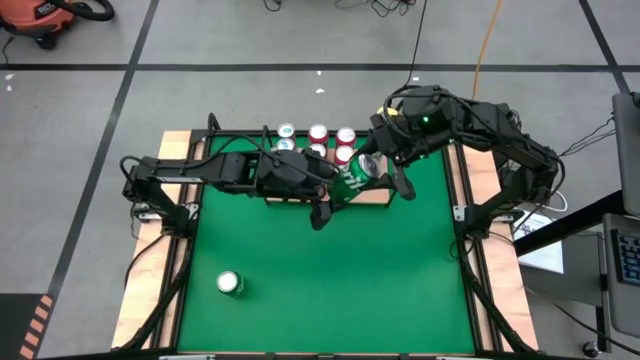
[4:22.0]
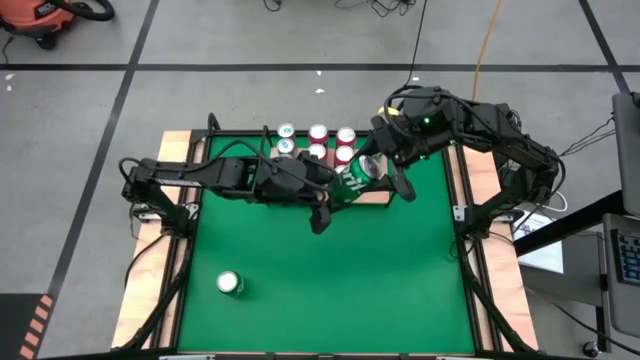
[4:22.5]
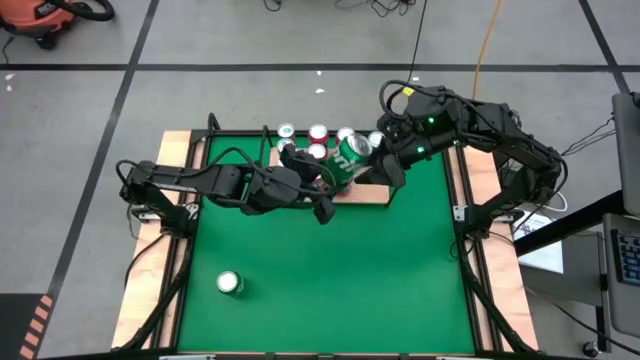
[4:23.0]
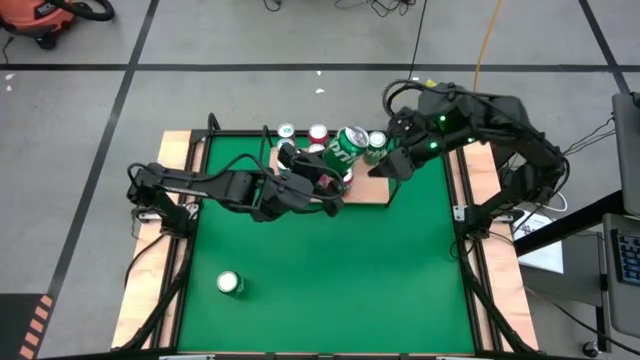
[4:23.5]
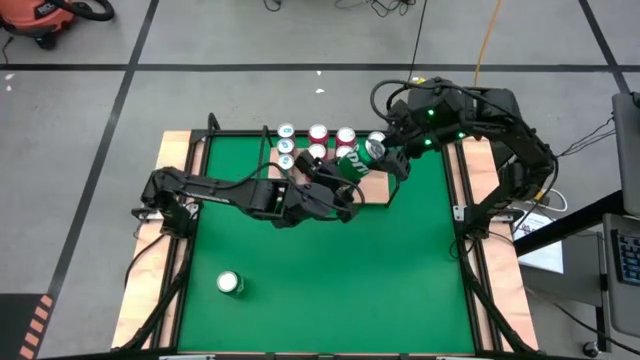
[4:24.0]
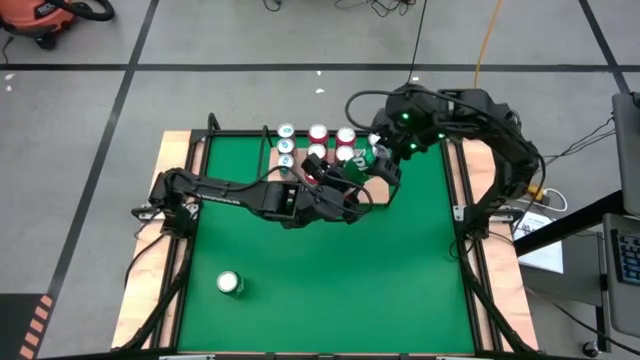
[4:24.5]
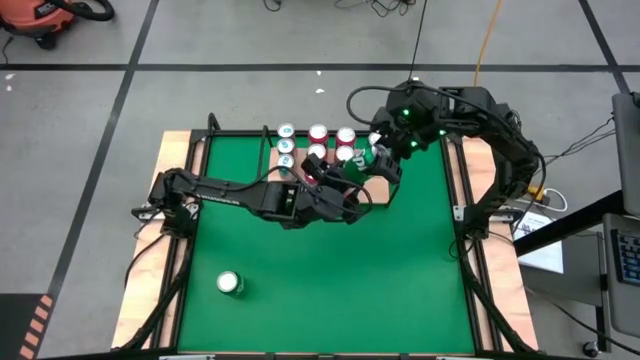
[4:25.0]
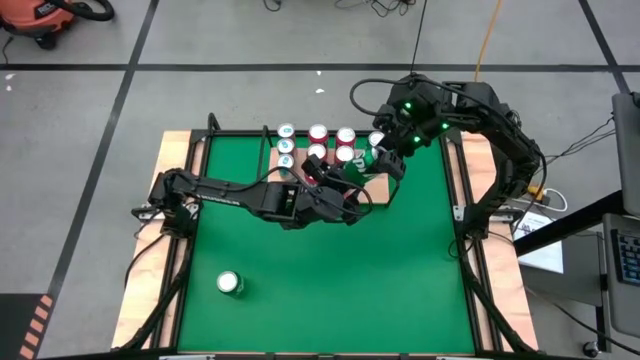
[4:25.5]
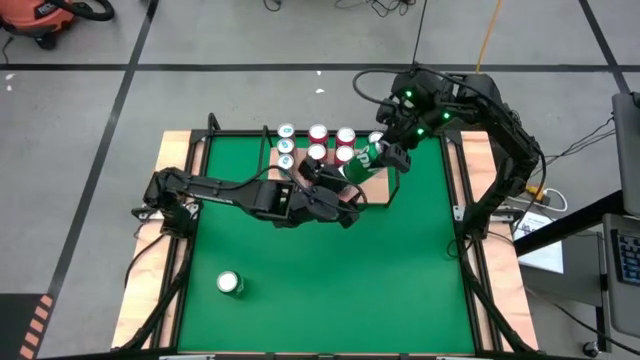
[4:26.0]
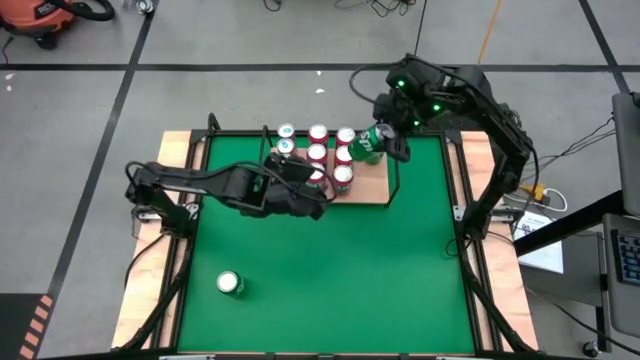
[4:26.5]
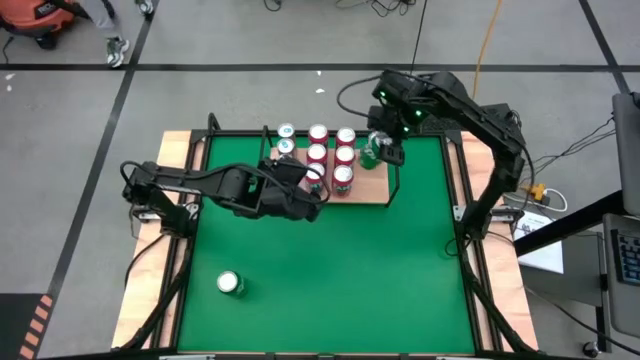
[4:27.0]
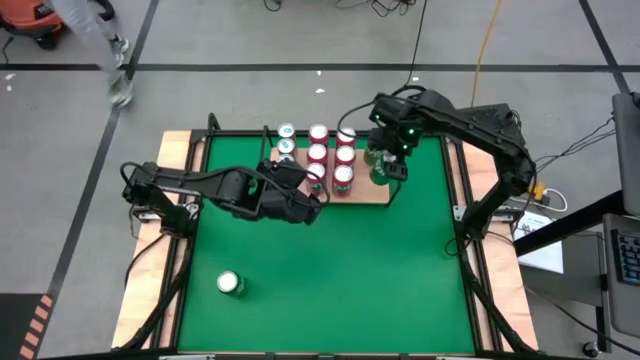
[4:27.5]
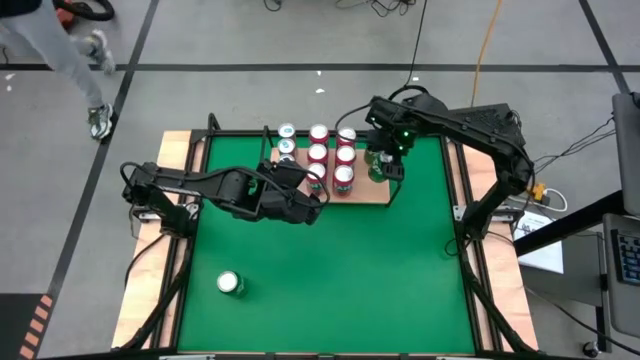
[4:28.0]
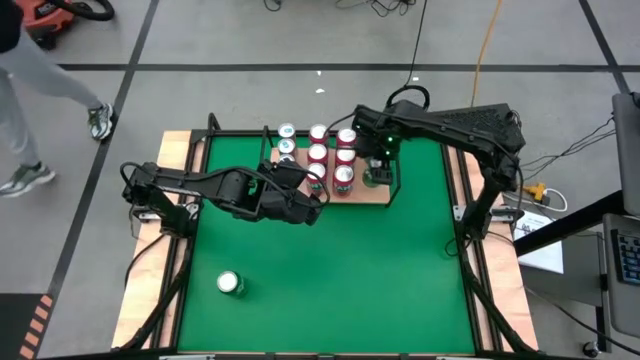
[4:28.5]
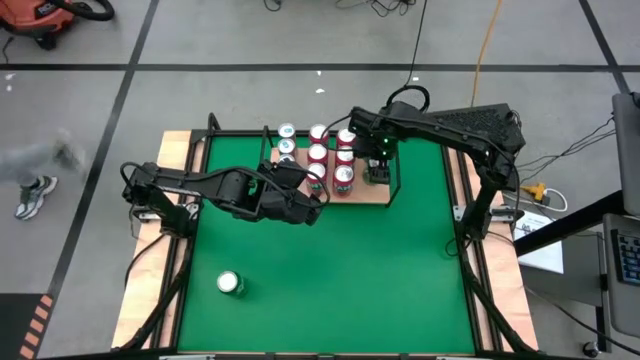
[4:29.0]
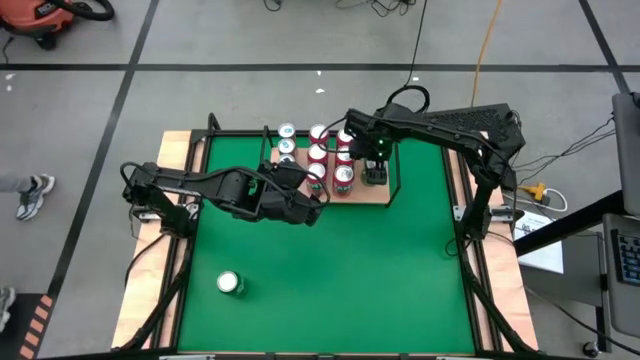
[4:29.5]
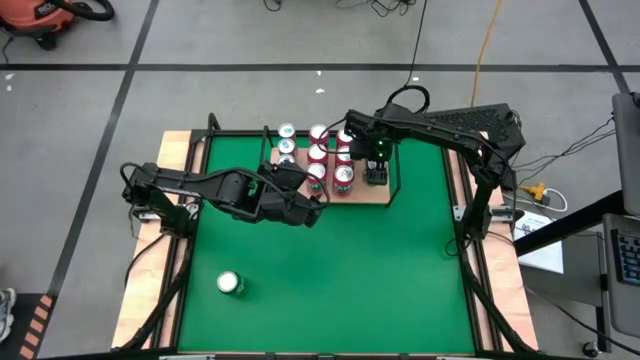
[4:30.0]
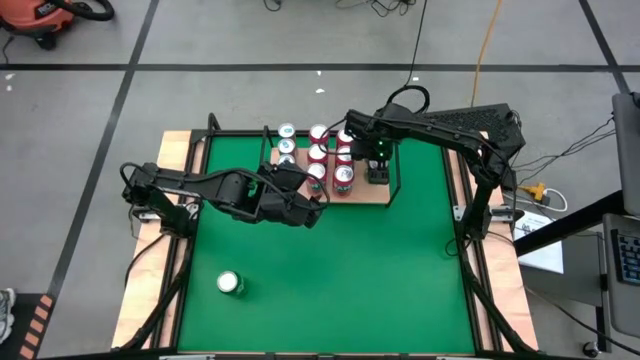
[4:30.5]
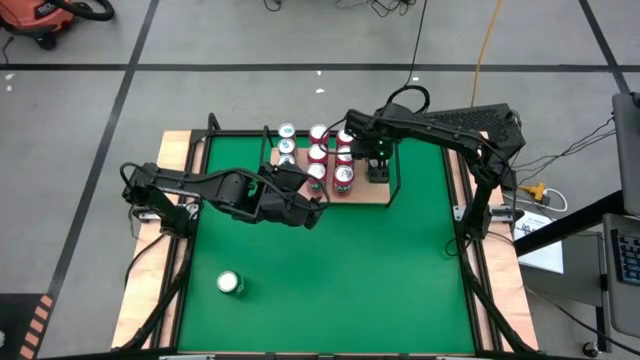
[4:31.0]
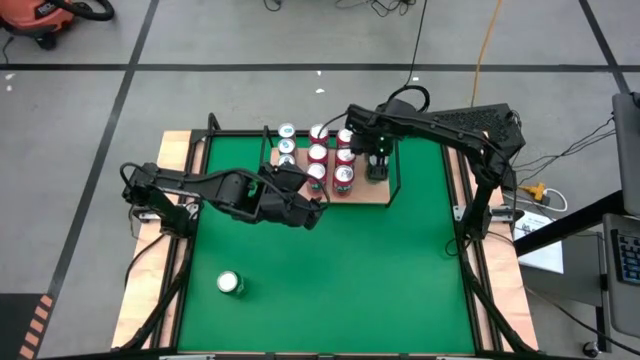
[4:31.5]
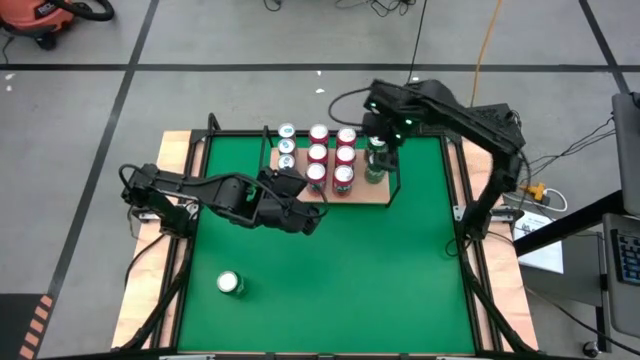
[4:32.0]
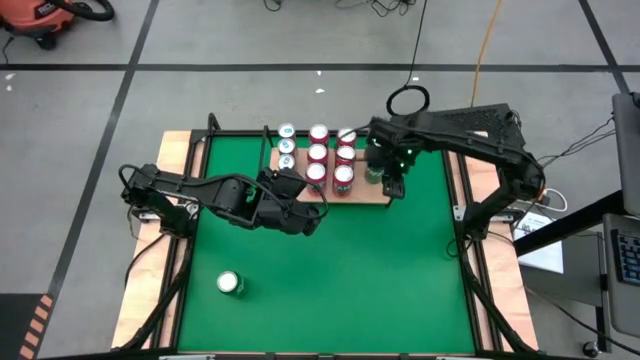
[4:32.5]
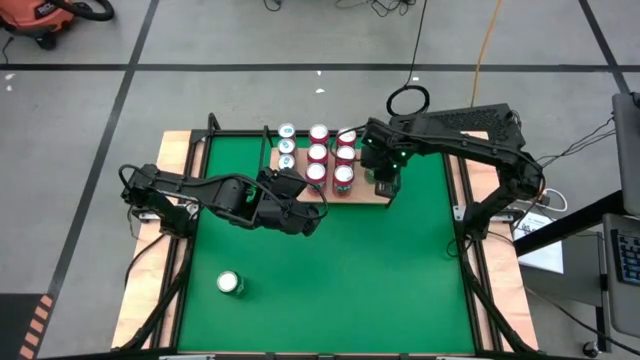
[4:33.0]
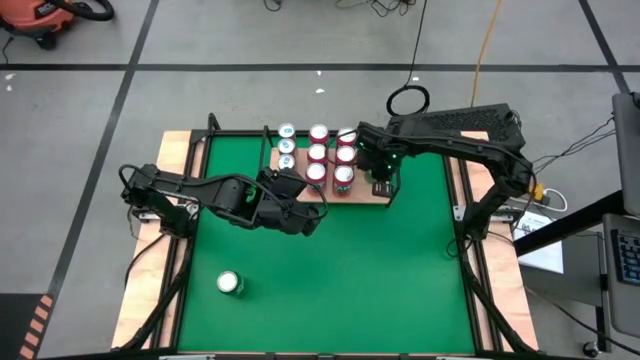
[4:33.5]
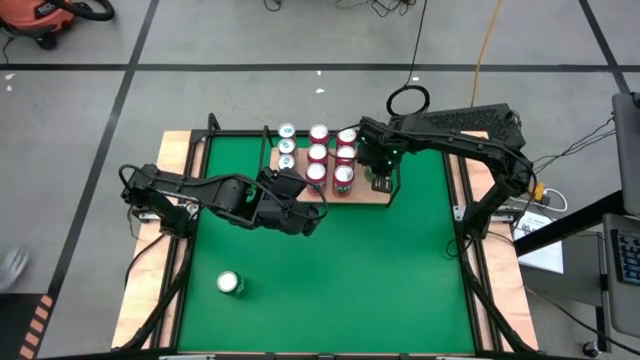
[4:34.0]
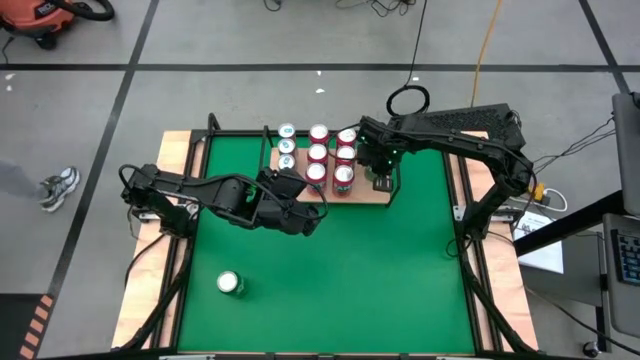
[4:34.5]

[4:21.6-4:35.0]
Task: Place canned beverage on shelf
Put the green soda can on the shelf aligned with the other green soda can

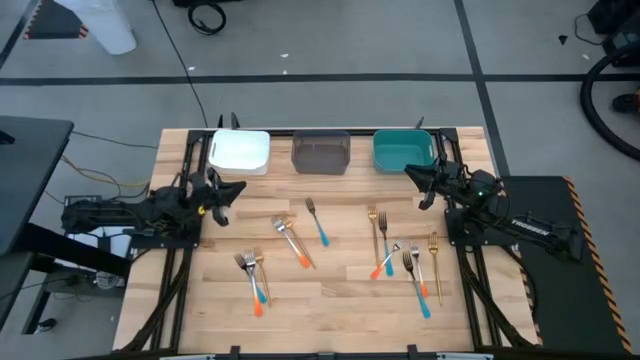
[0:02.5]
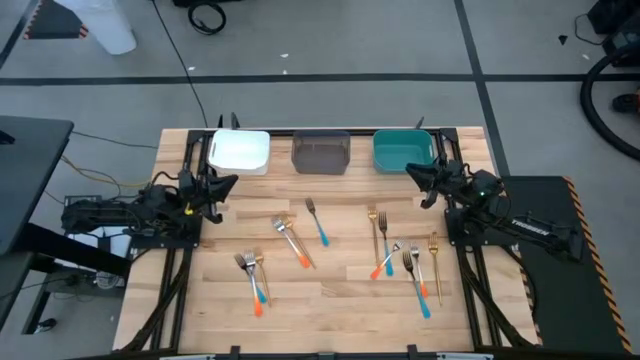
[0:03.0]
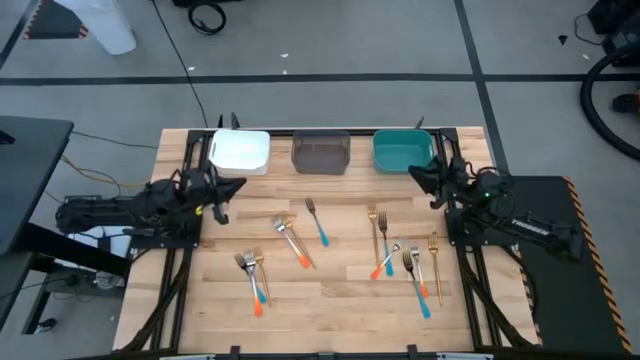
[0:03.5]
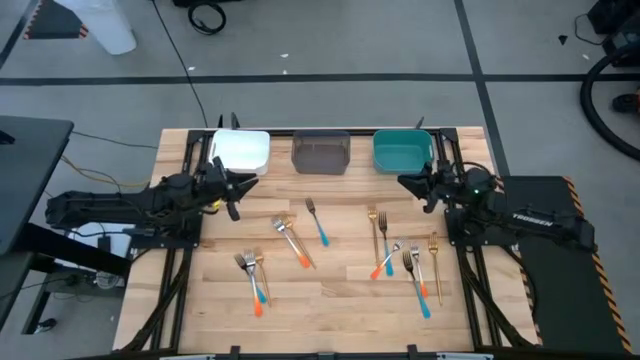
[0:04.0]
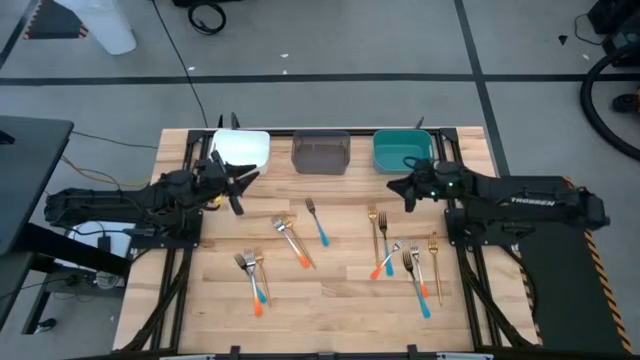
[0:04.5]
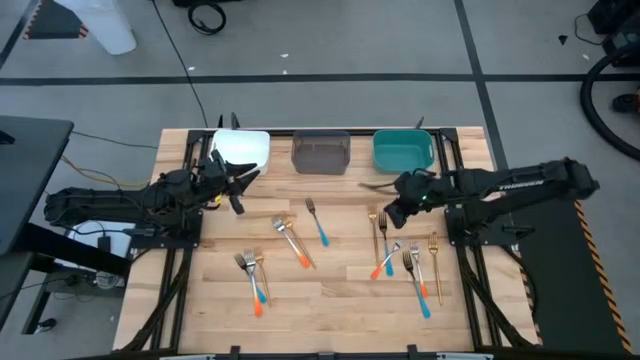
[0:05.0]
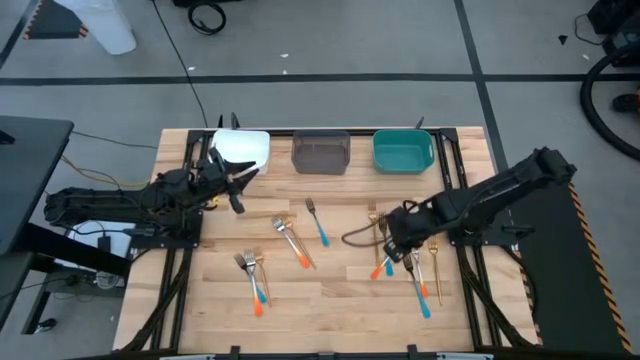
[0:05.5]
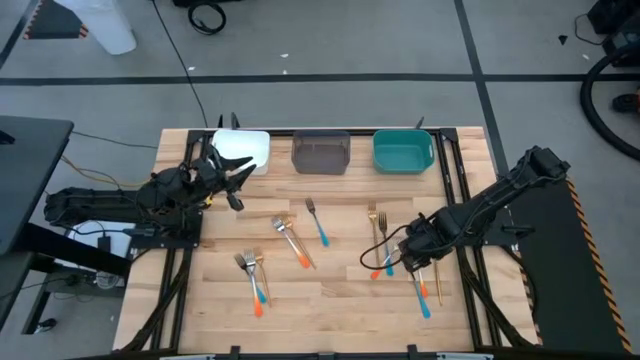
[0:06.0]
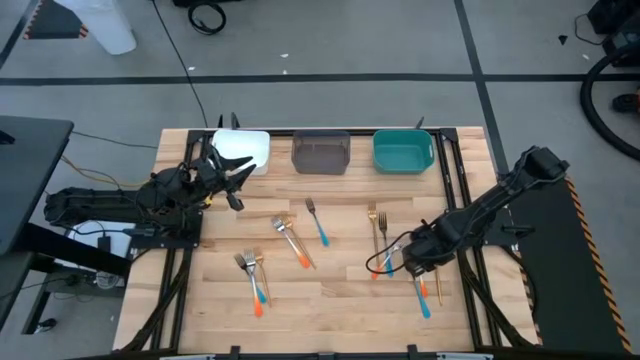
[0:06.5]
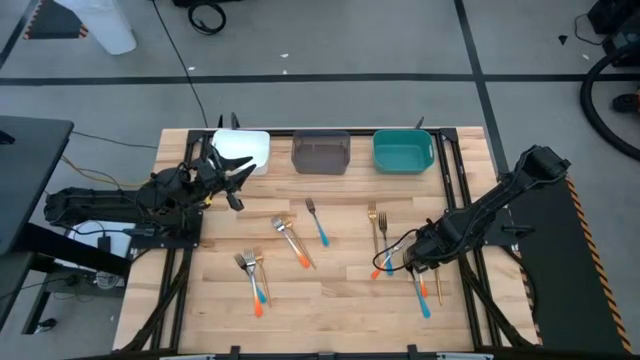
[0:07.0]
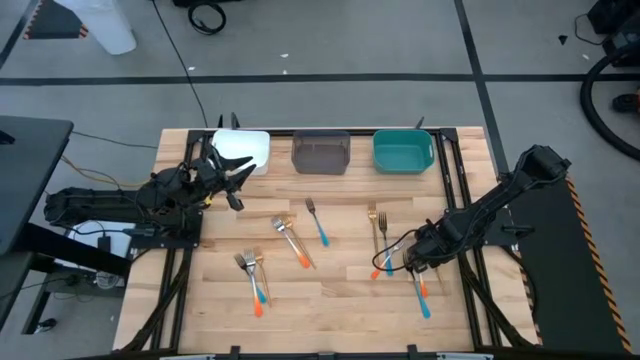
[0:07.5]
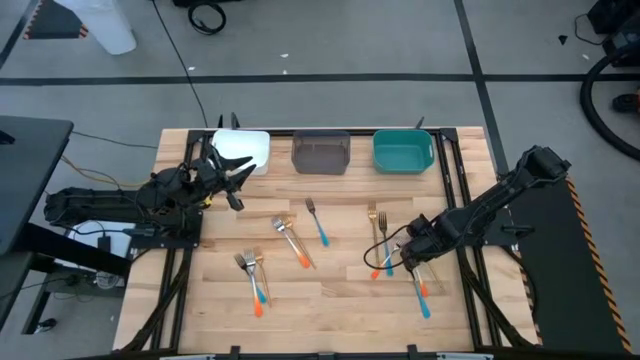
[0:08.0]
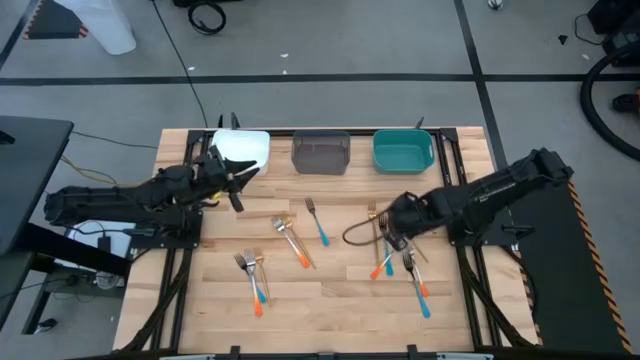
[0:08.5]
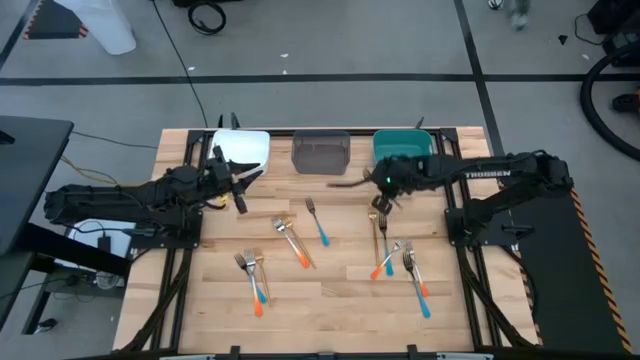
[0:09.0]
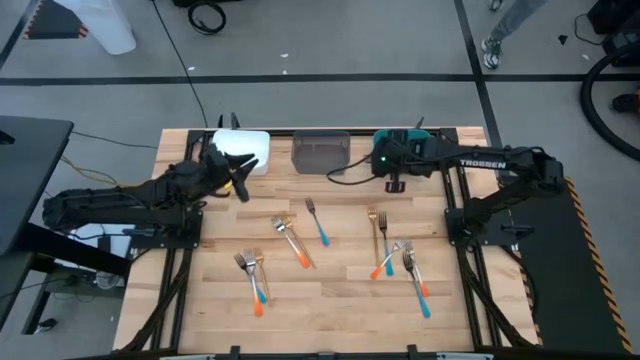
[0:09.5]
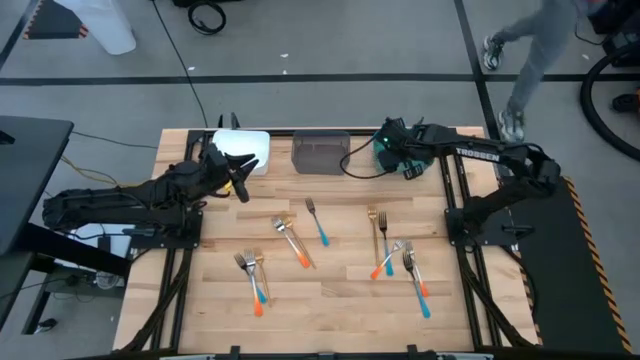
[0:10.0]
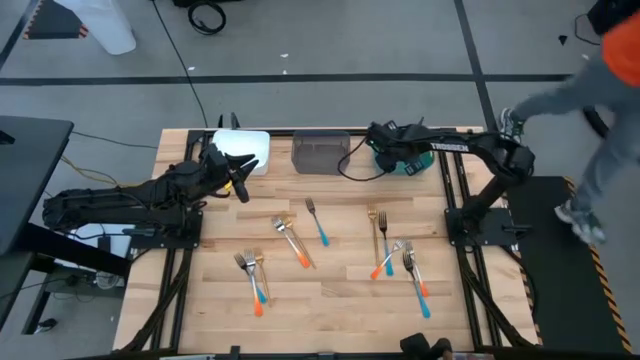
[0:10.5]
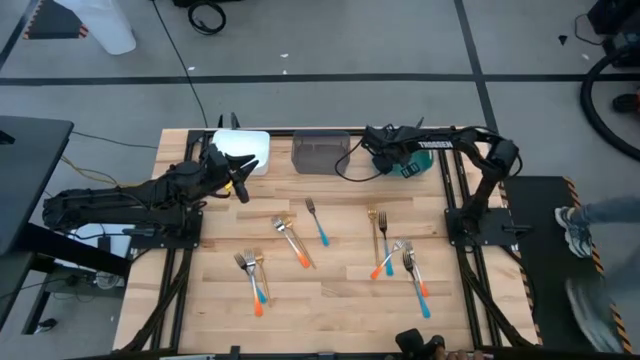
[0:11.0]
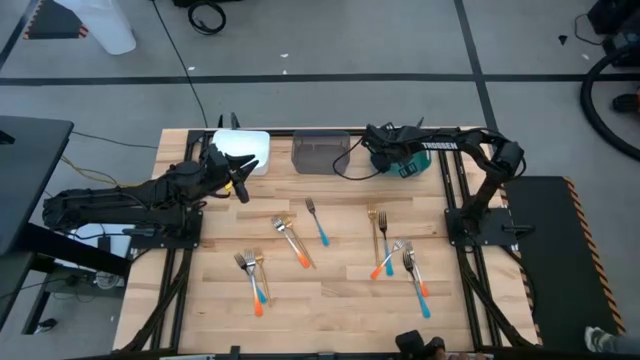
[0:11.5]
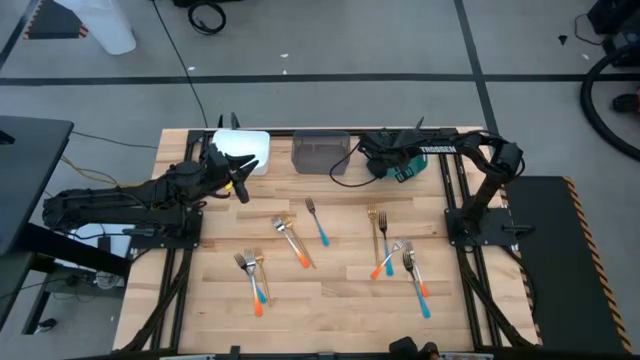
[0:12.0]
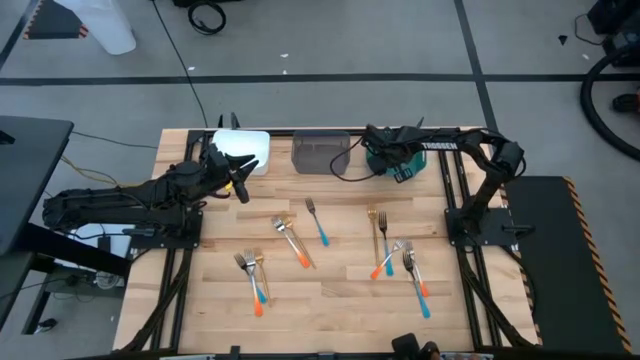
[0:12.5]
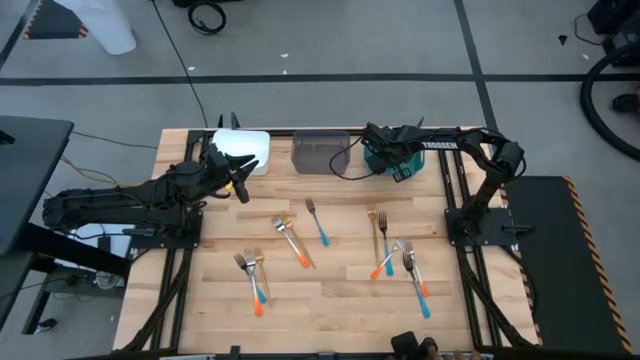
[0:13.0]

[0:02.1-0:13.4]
Task: Sort silverware by color (type)
Put the gold fork into the green bin
